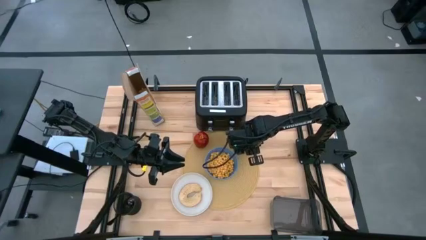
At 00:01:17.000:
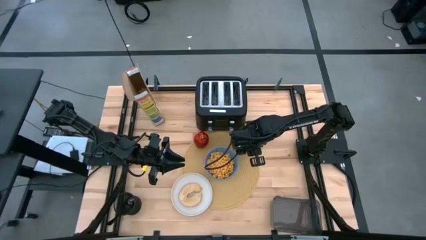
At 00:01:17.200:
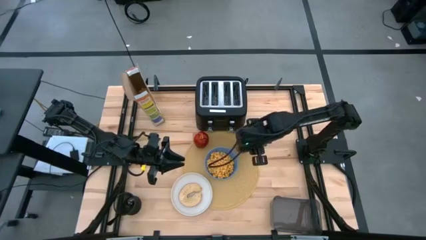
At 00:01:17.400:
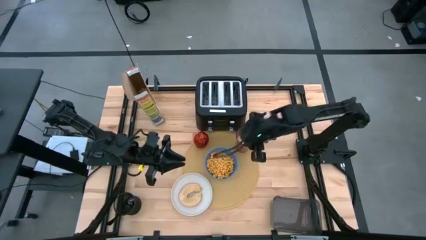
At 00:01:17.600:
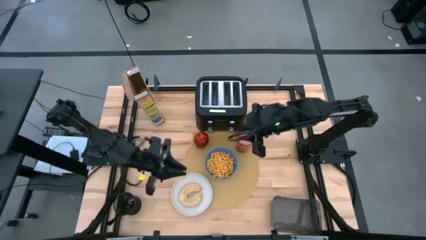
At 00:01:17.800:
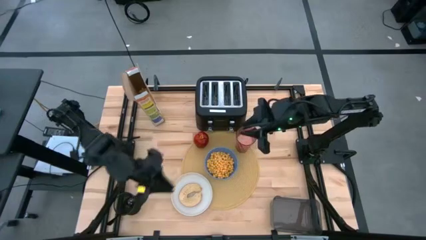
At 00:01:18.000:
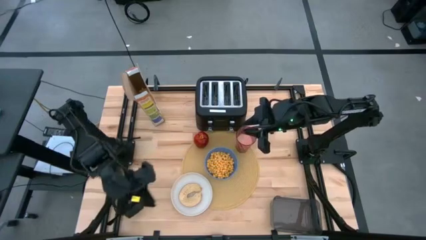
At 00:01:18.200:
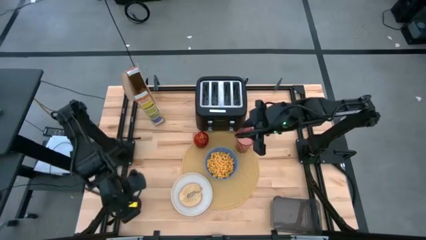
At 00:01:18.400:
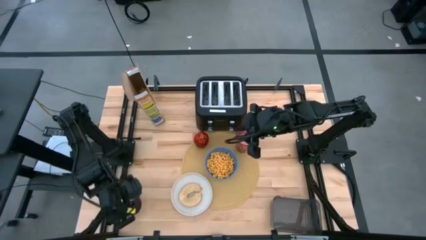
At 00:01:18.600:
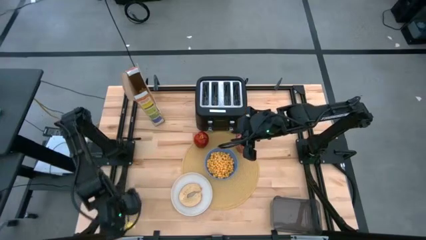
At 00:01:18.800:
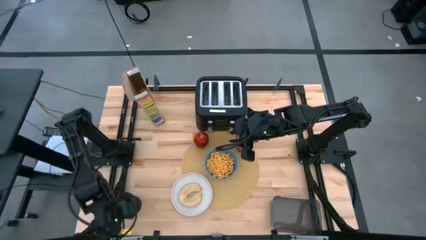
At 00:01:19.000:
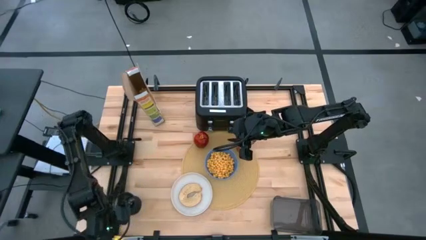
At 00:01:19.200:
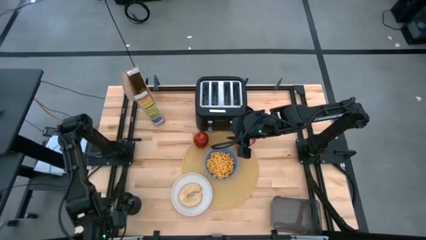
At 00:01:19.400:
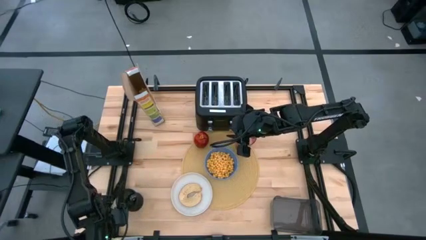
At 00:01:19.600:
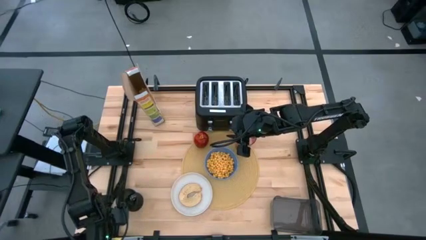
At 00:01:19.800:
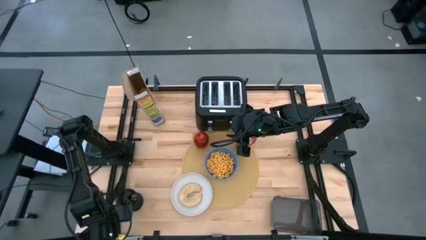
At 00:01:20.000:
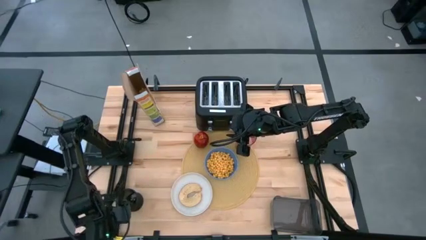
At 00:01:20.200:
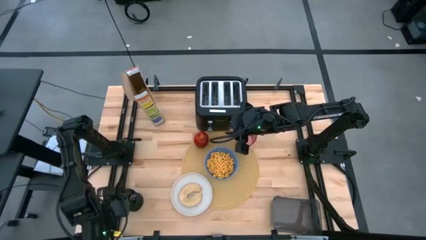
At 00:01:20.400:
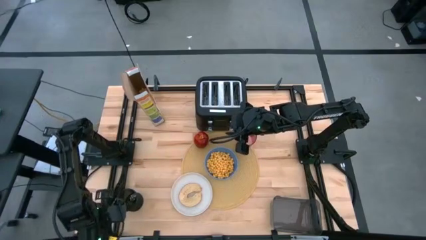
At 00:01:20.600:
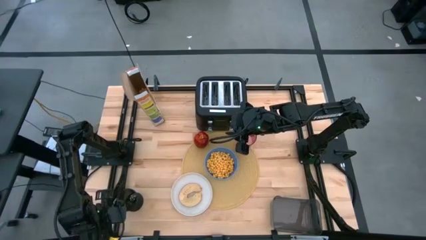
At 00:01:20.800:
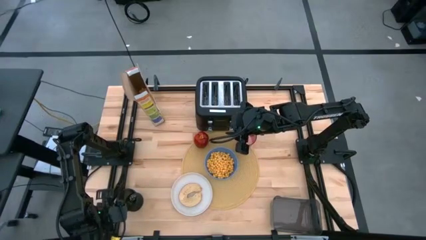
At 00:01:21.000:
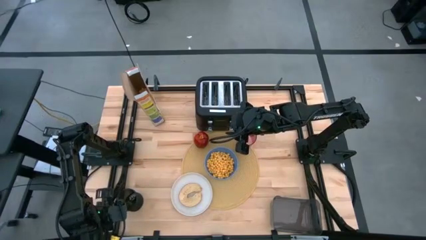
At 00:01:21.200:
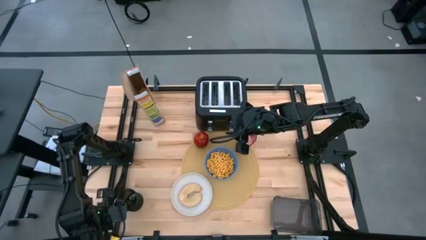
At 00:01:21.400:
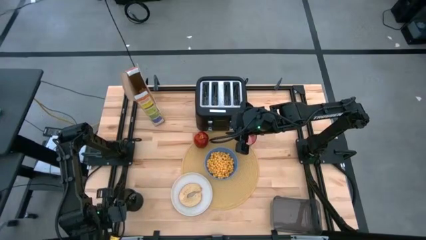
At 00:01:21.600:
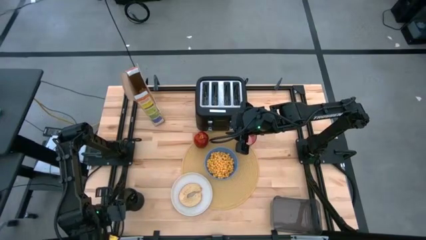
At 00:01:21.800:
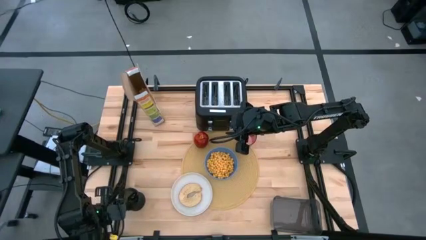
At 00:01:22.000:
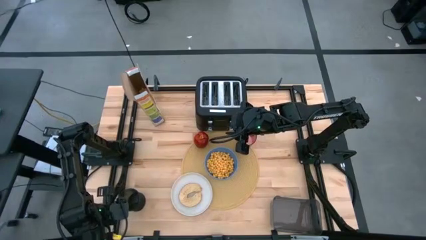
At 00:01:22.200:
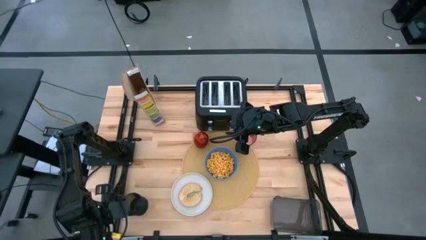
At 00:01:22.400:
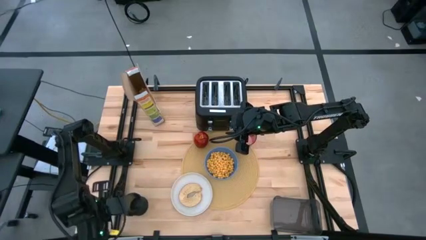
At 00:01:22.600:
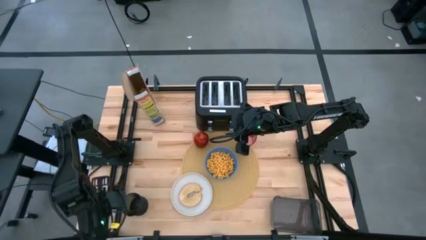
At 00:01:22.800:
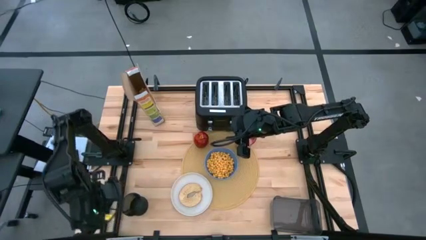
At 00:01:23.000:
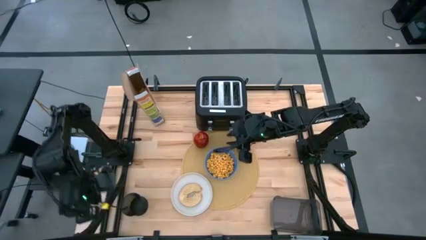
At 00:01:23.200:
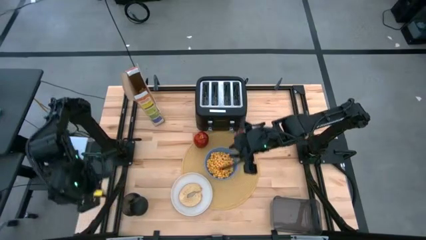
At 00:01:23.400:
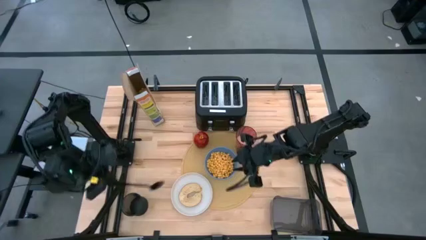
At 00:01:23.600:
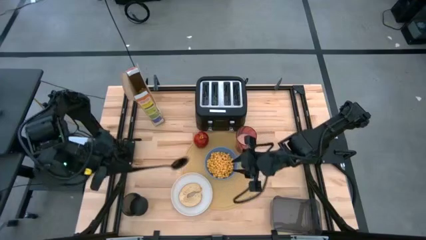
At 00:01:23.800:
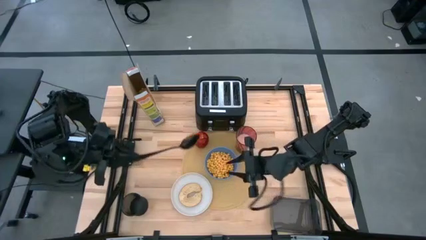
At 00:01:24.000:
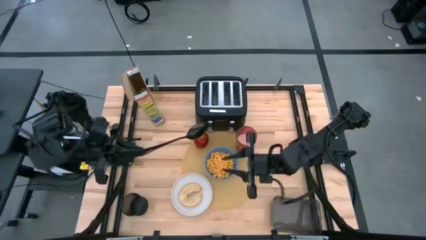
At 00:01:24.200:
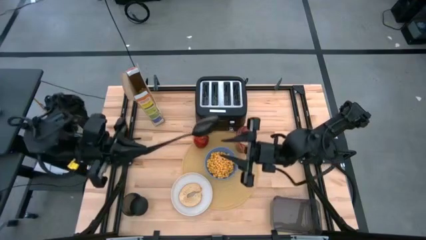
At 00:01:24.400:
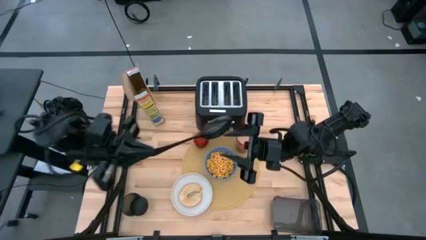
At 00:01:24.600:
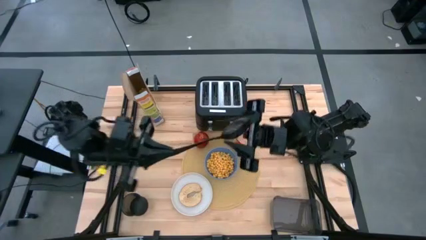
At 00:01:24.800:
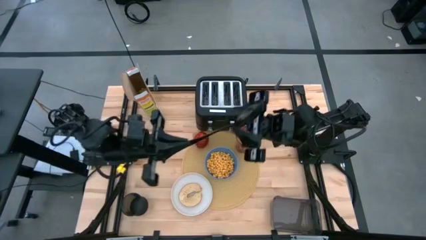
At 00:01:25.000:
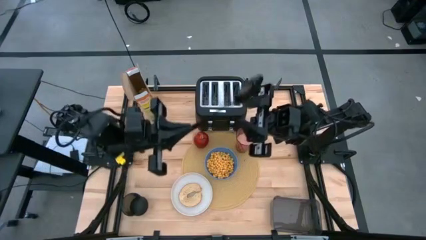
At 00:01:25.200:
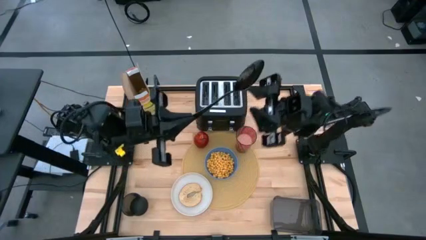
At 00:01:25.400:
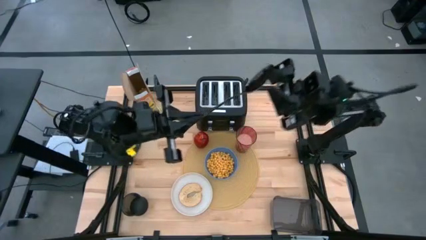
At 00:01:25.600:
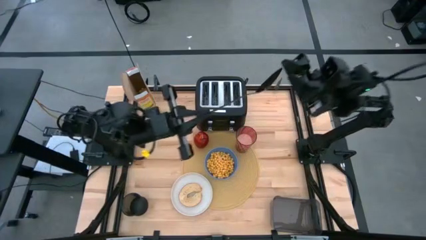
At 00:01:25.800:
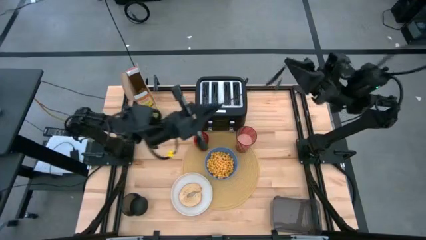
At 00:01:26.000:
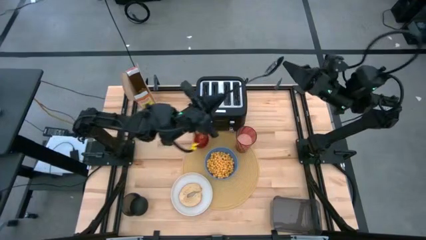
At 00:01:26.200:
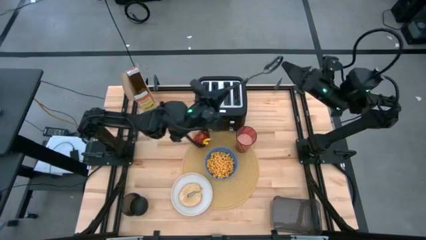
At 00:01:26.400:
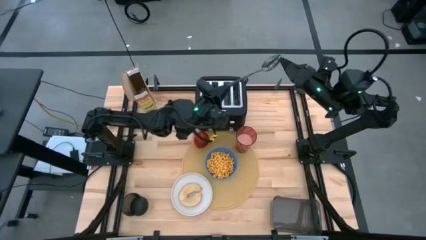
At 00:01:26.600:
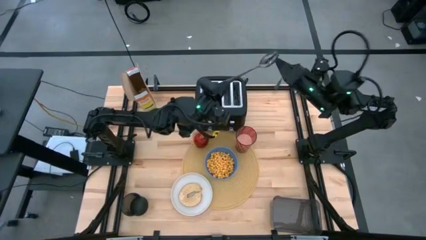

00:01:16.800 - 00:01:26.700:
Task: Arrange a breakfast setting
Put the spoon on the placemat to the right of the bowl
